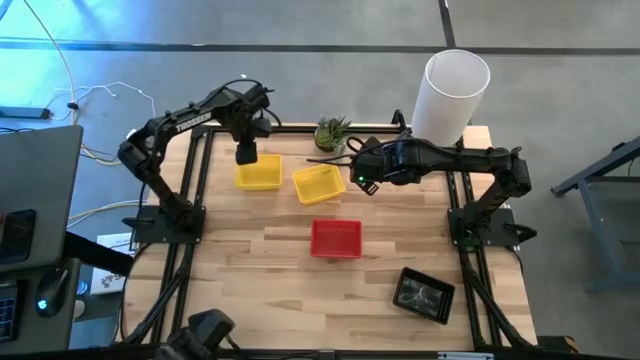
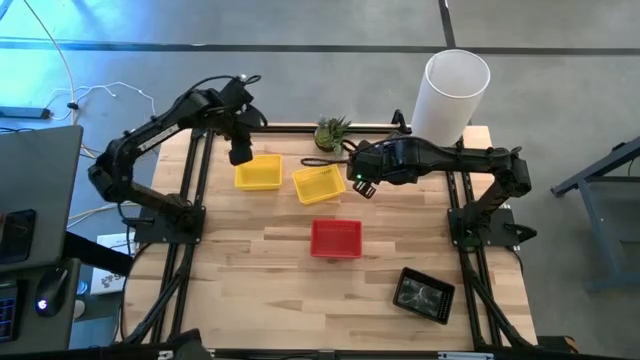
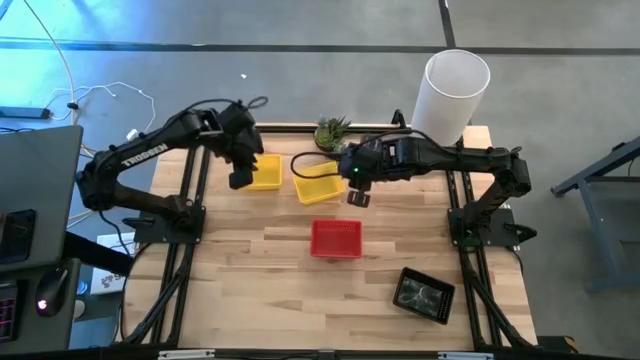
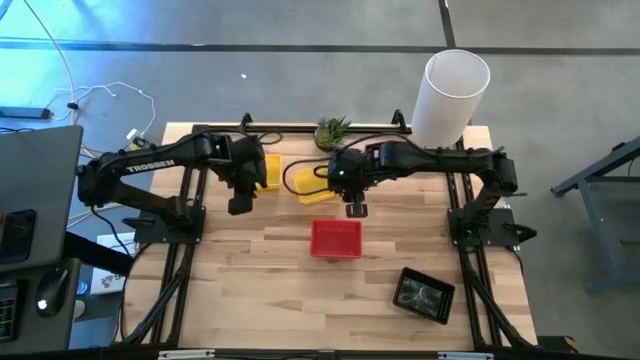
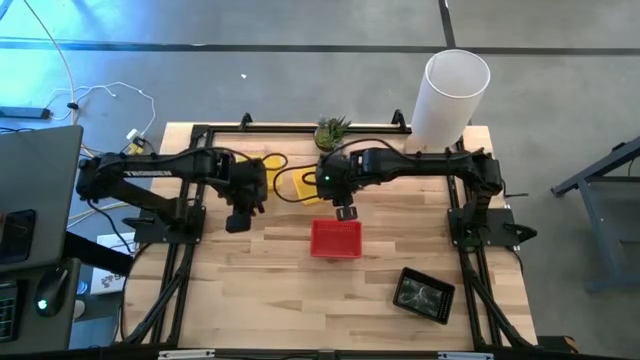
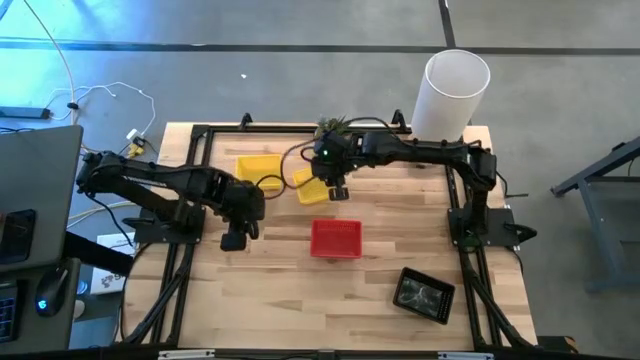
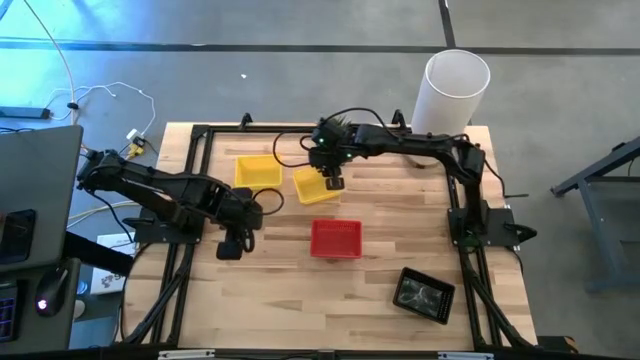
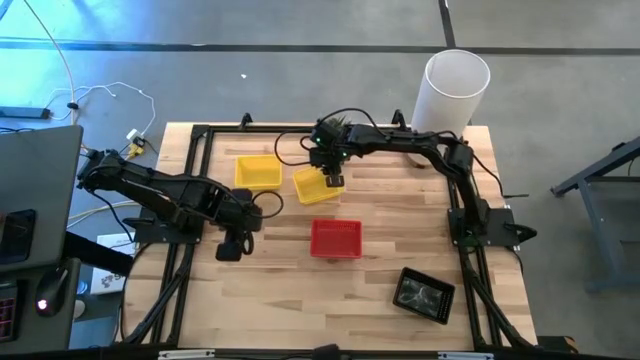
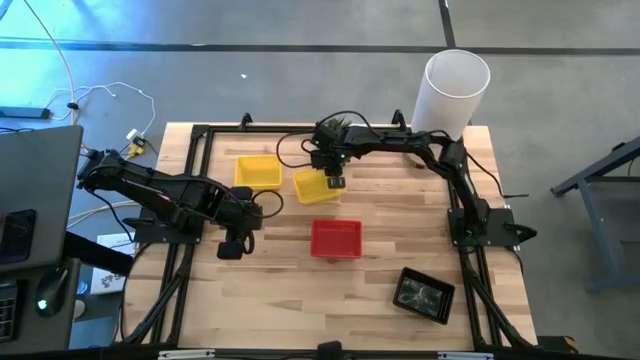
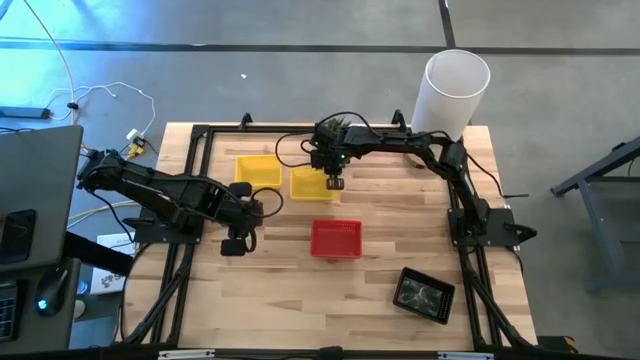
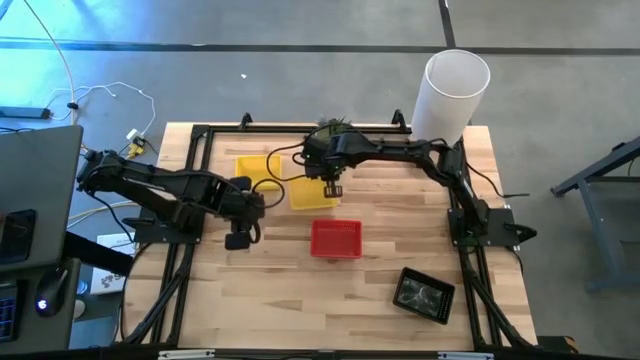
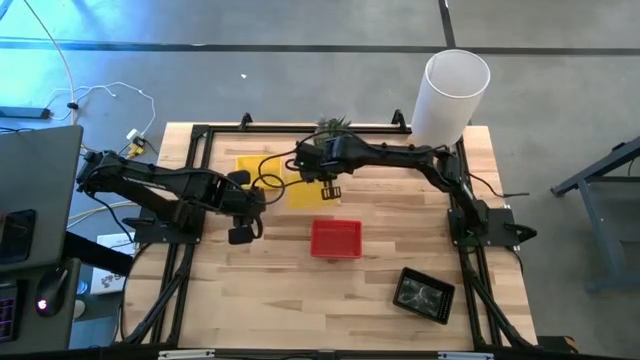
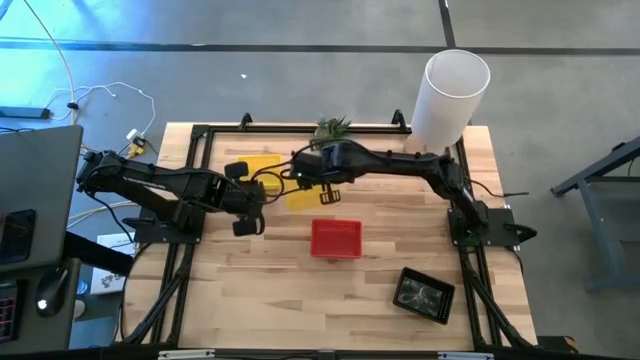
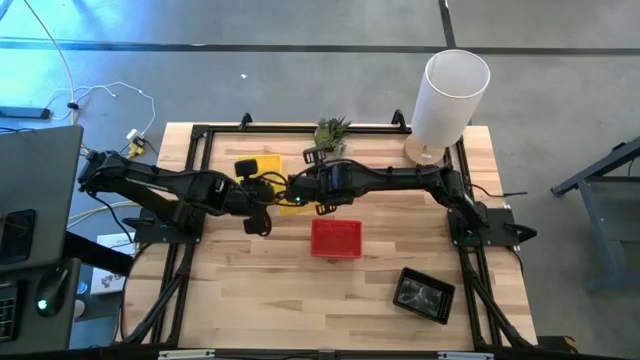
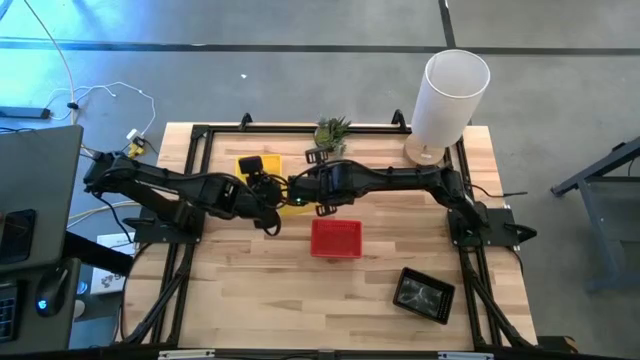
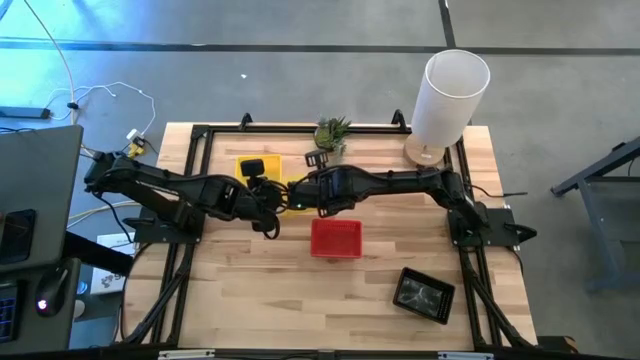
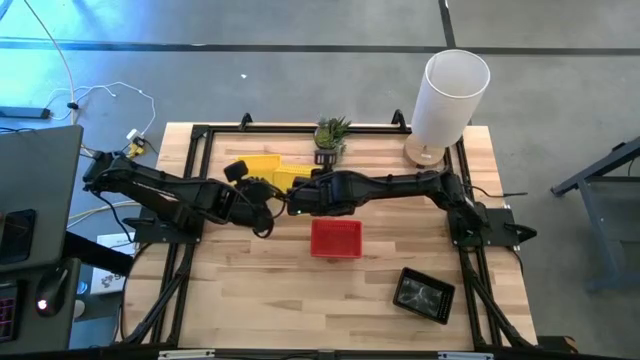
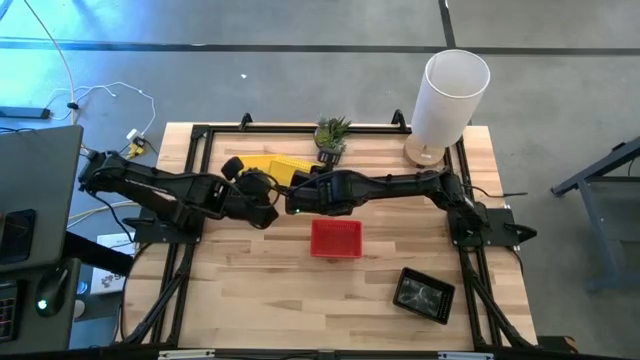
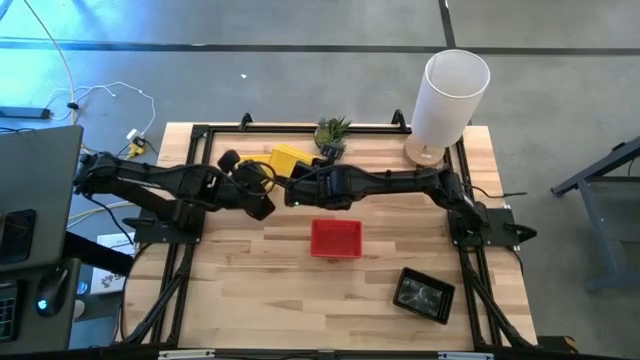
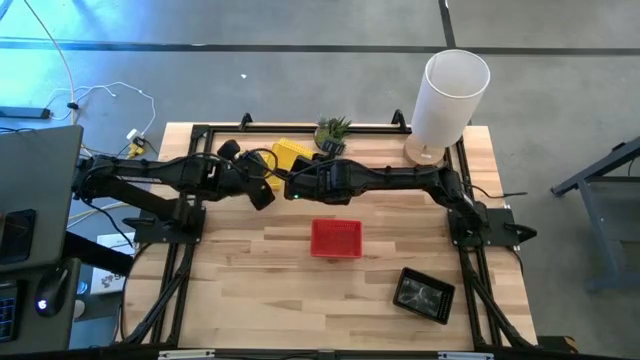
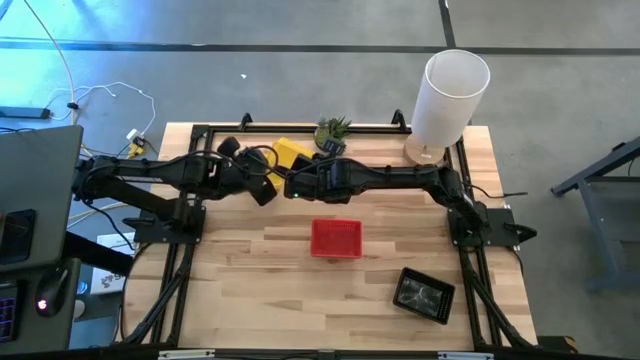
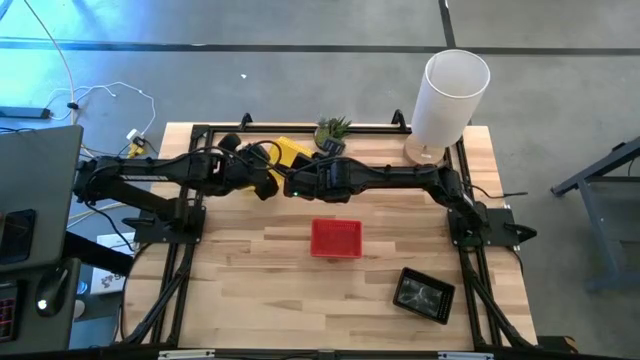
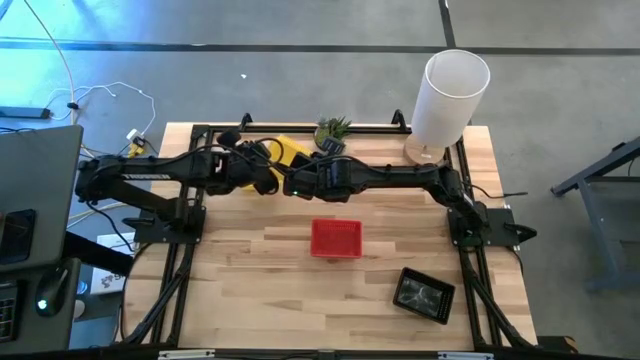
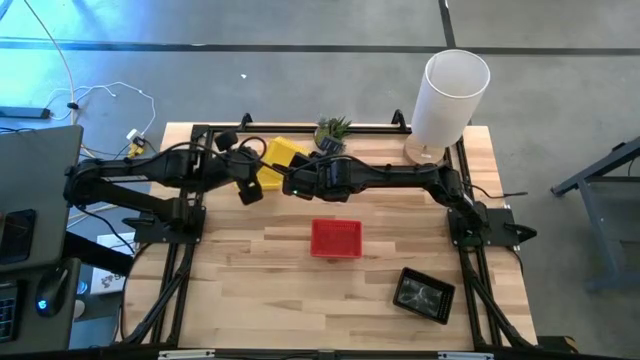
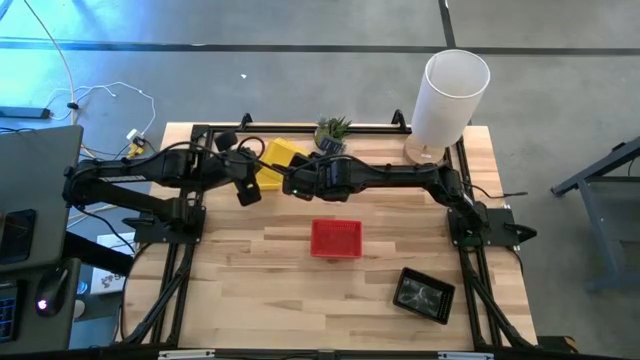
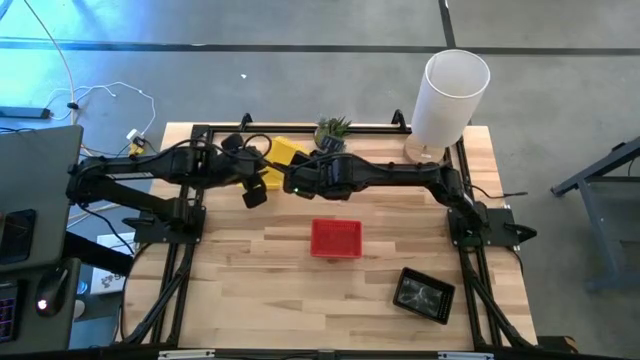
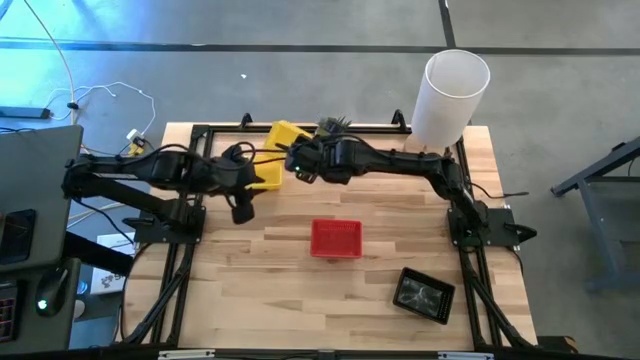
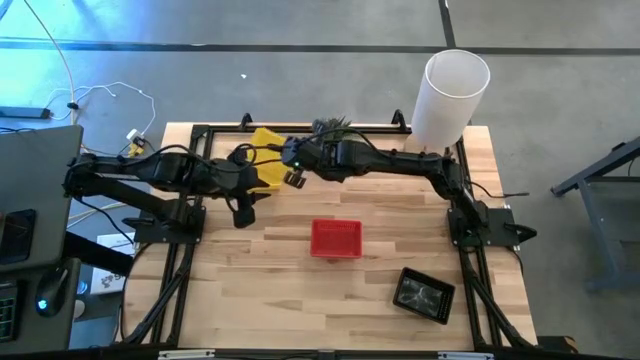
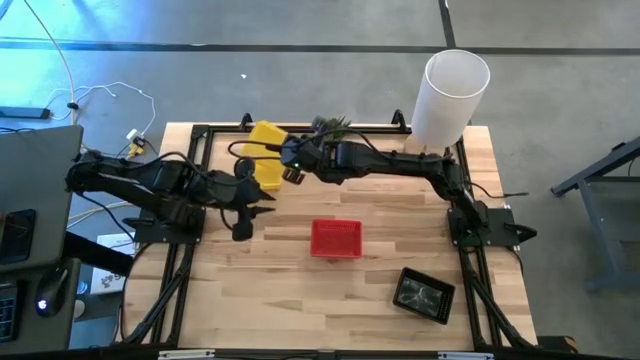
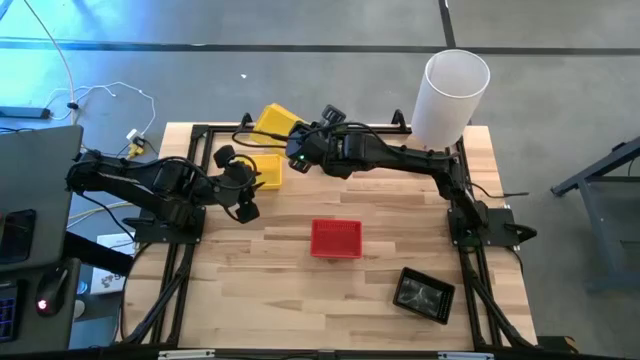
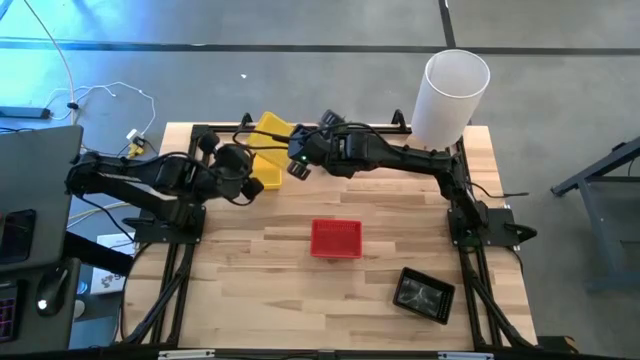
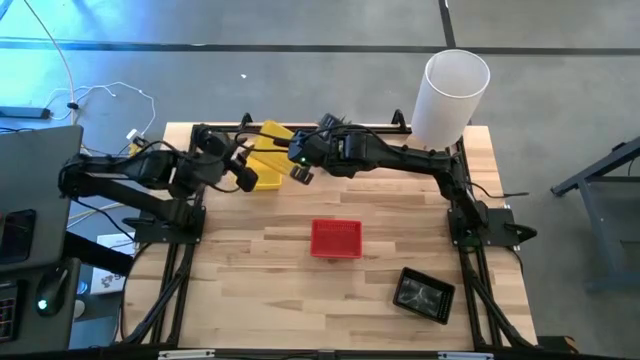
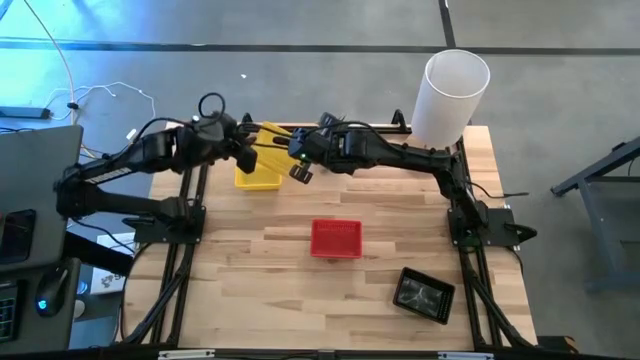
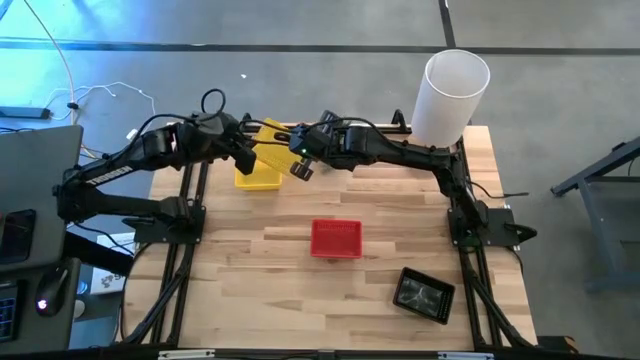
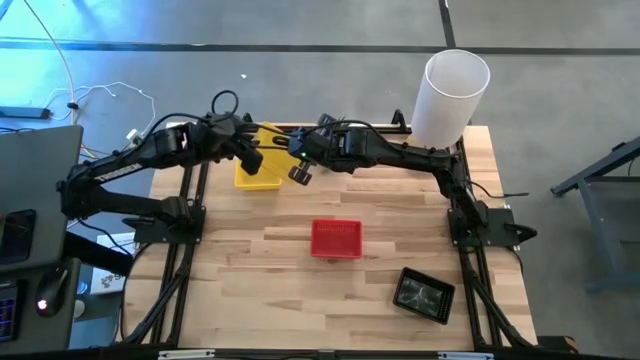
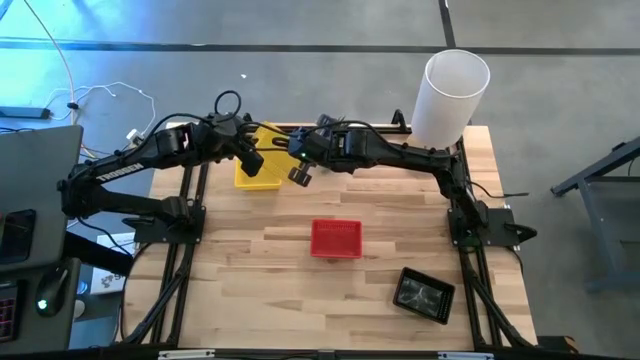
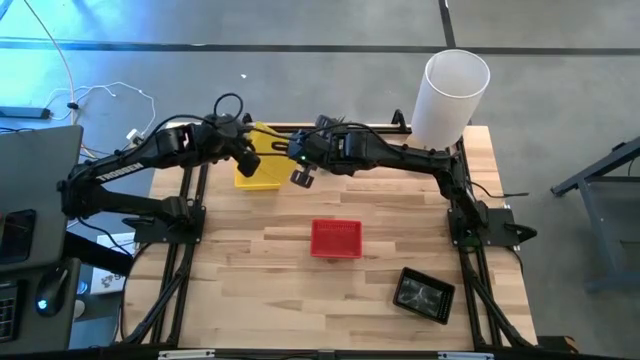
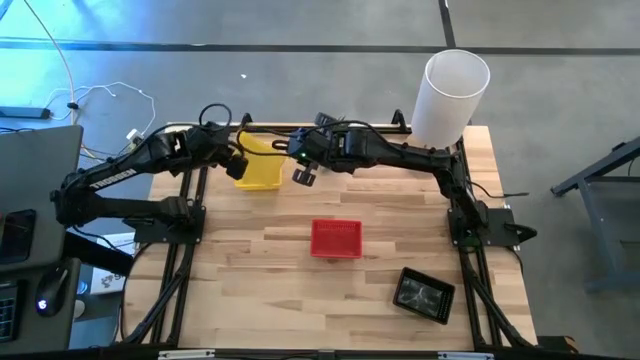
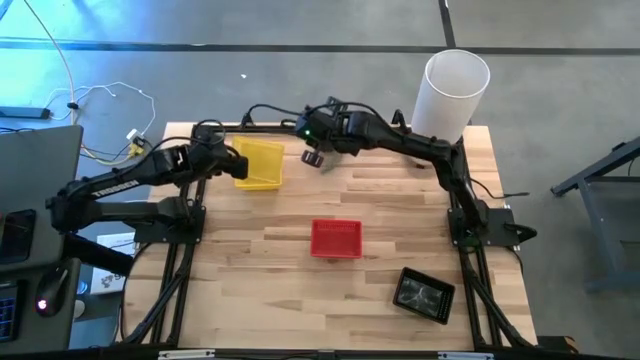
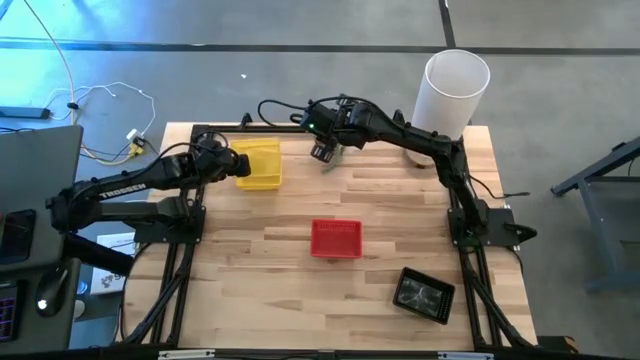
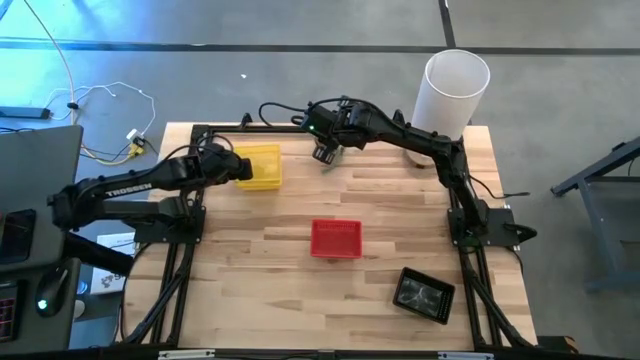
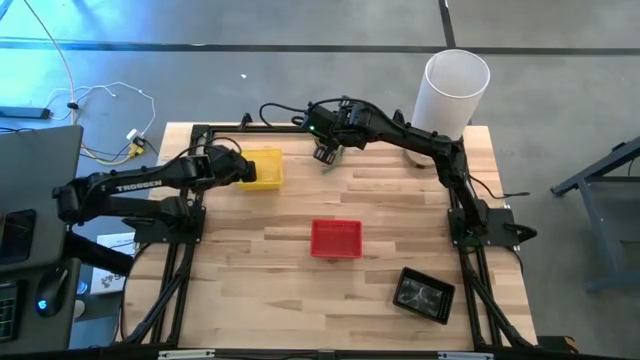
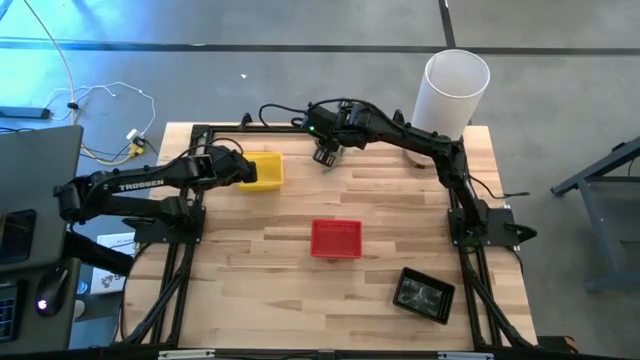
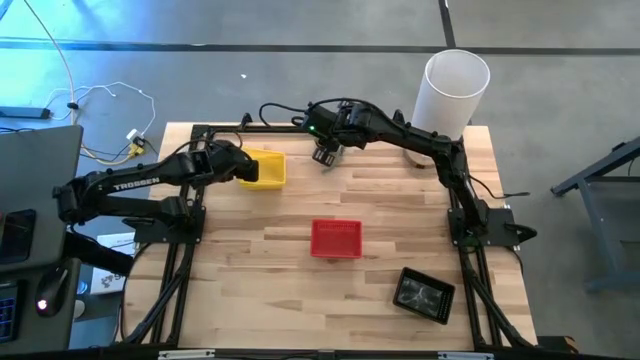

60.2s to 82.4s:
Stack the right yellow bin on top of the left stacked yellow bins

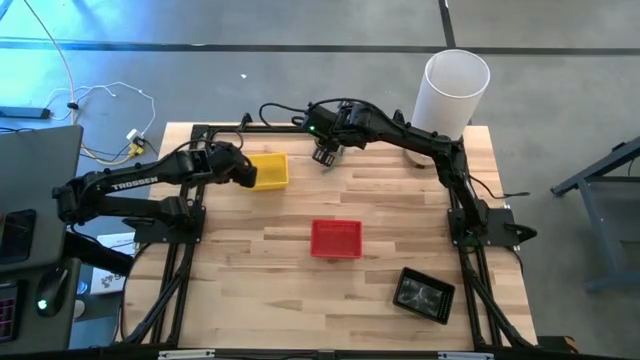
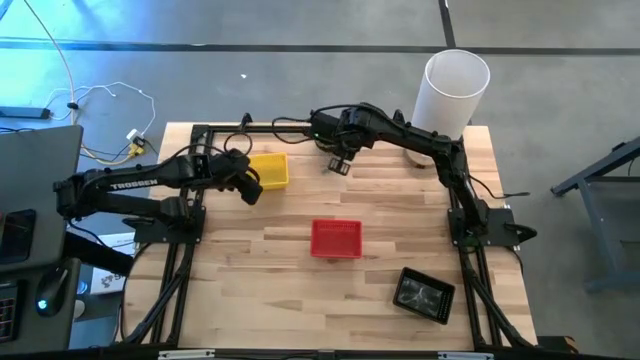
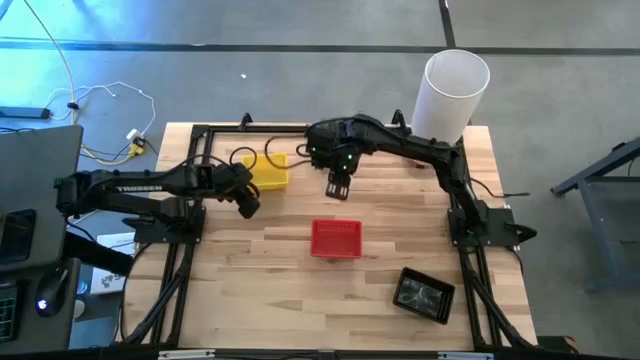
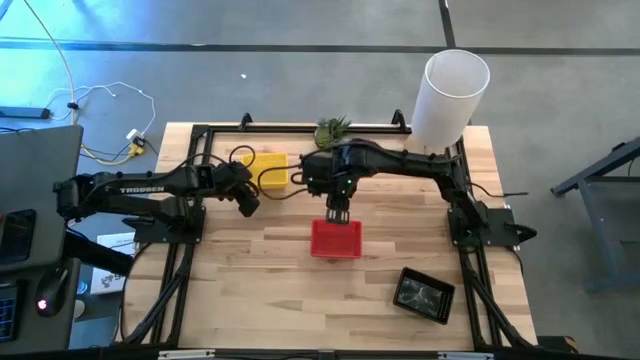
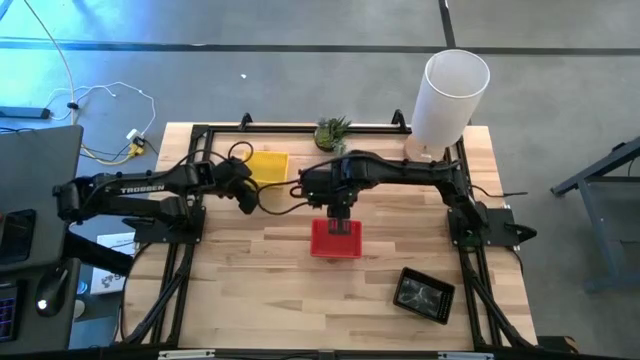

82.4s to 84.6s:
Adjust the stacked yellow bins
